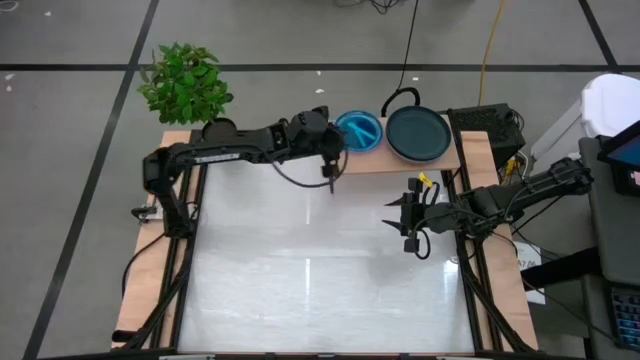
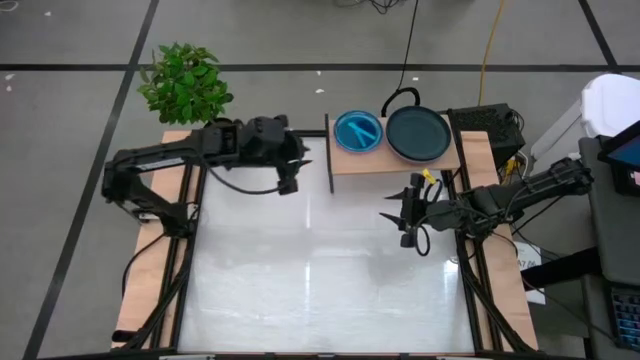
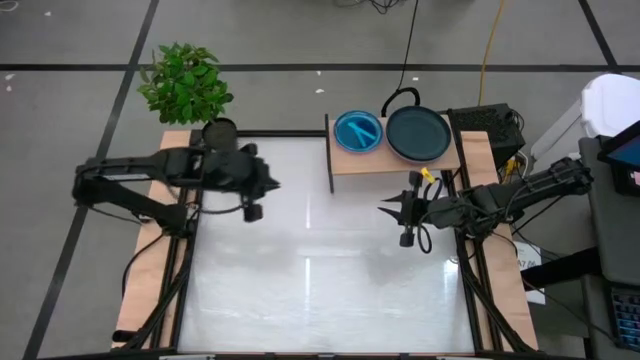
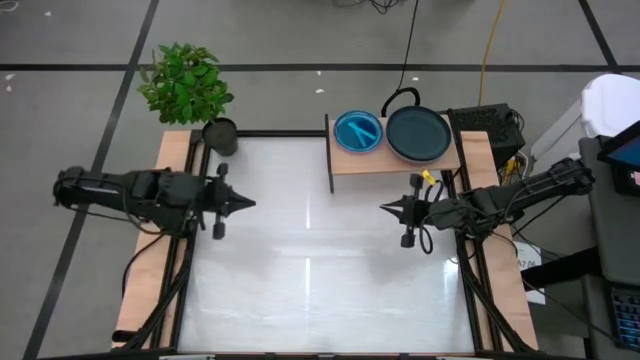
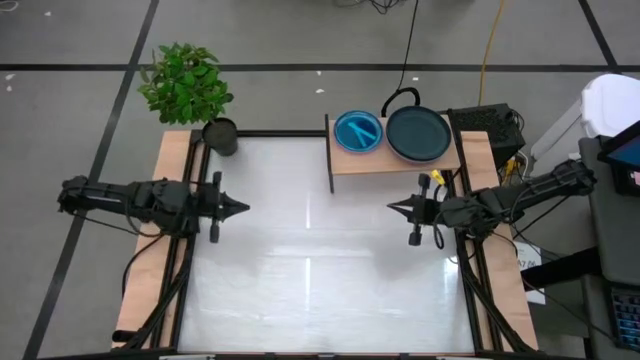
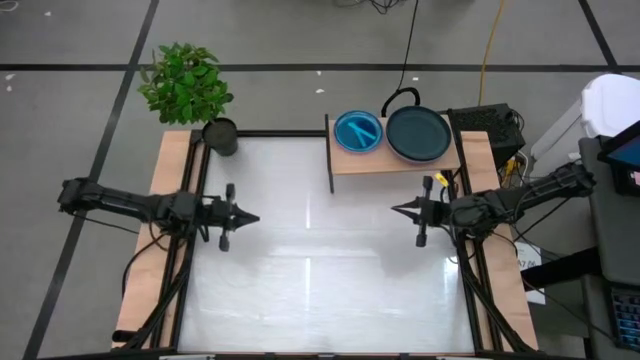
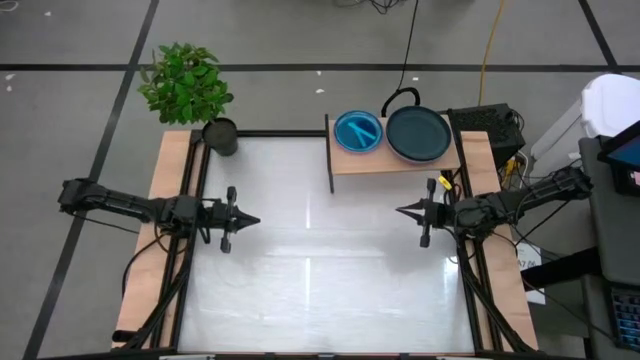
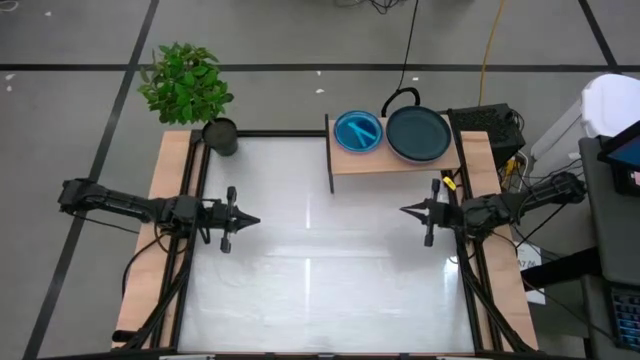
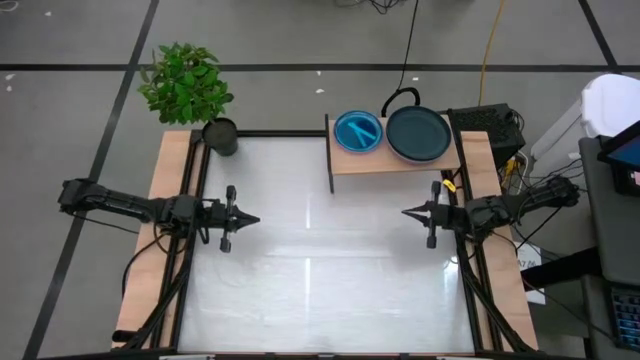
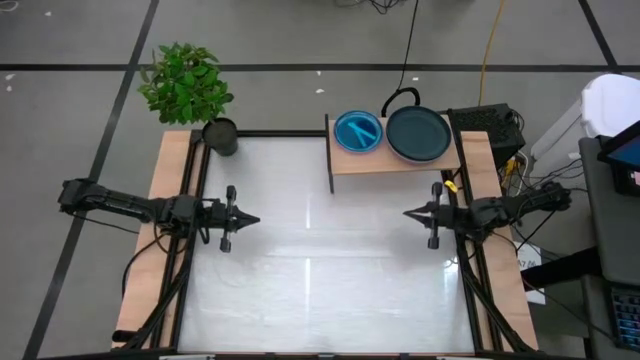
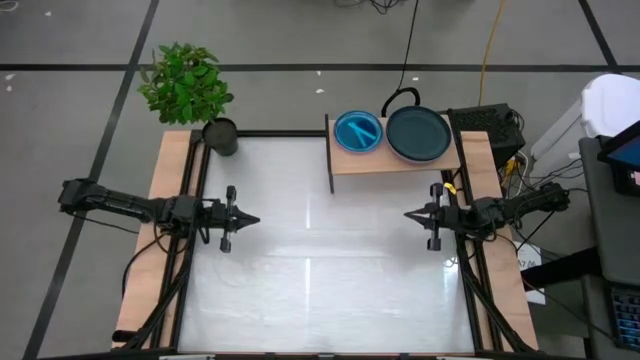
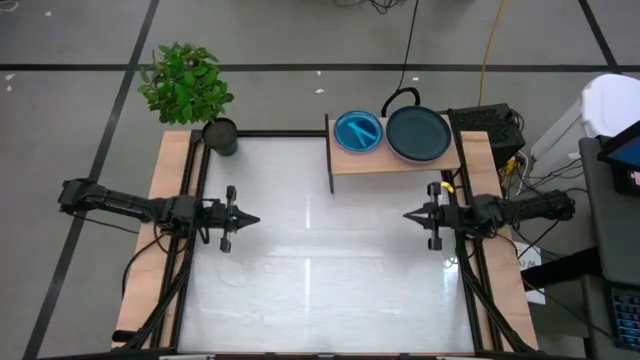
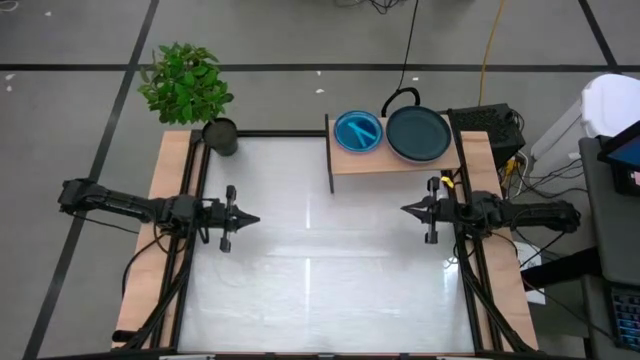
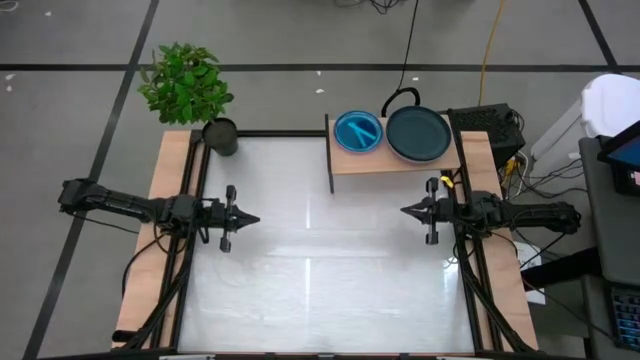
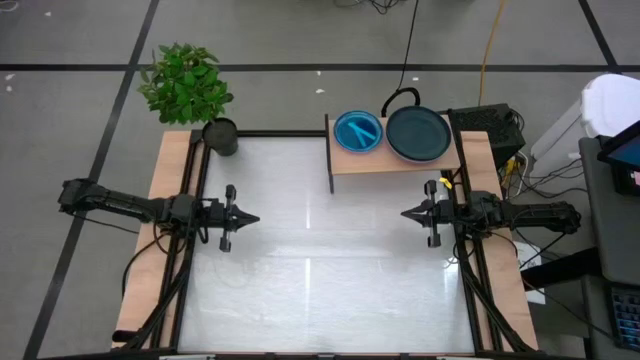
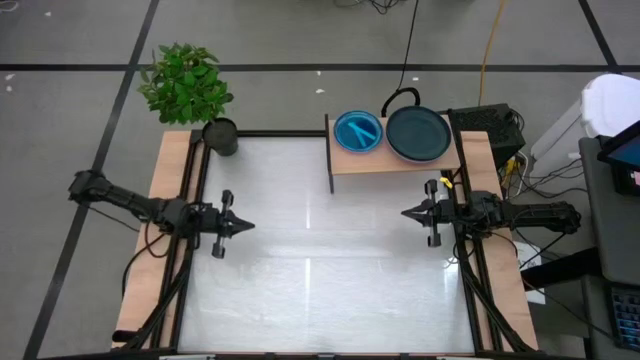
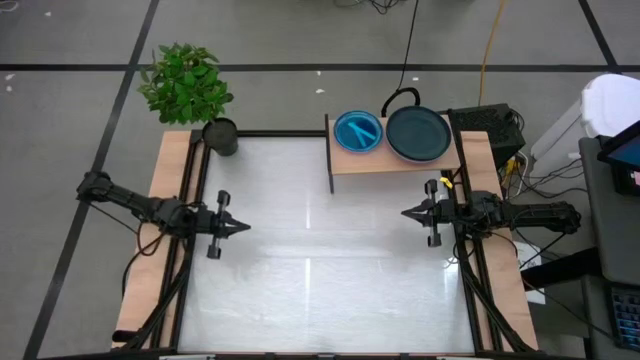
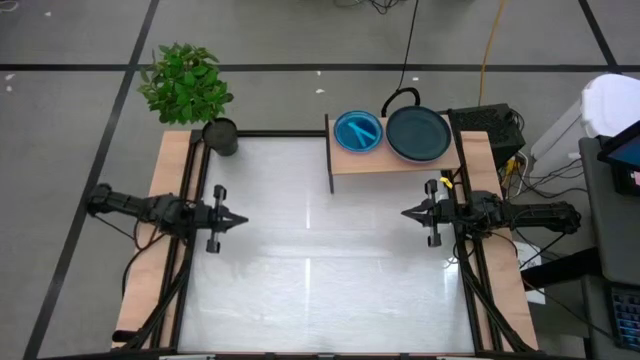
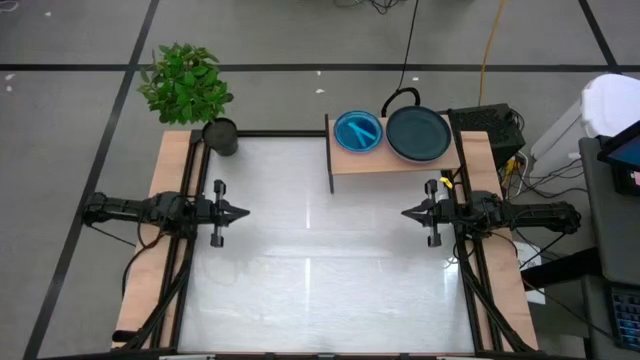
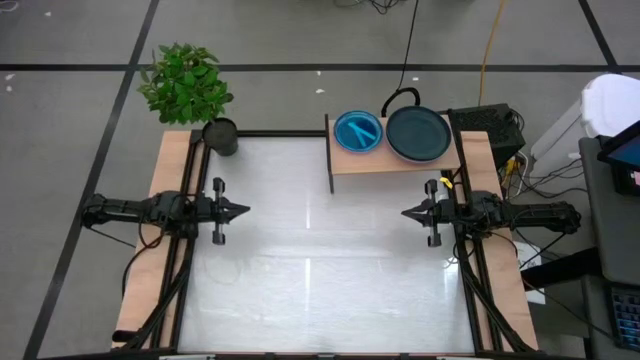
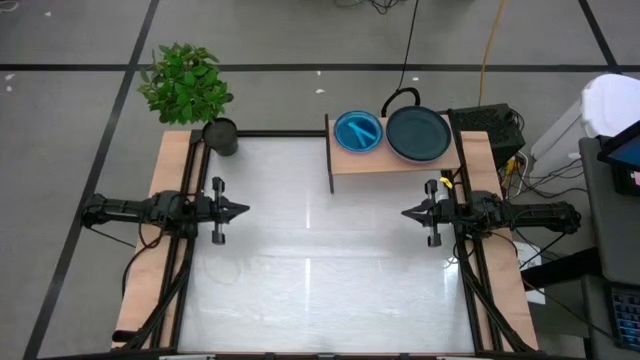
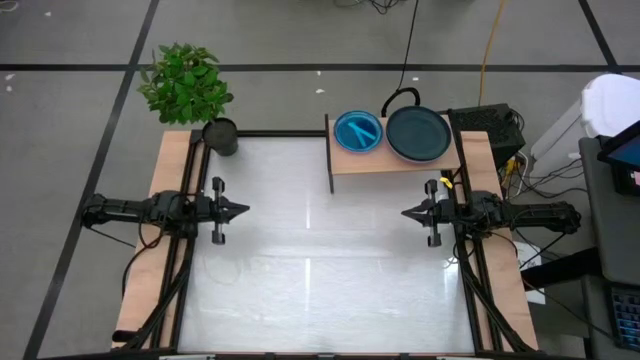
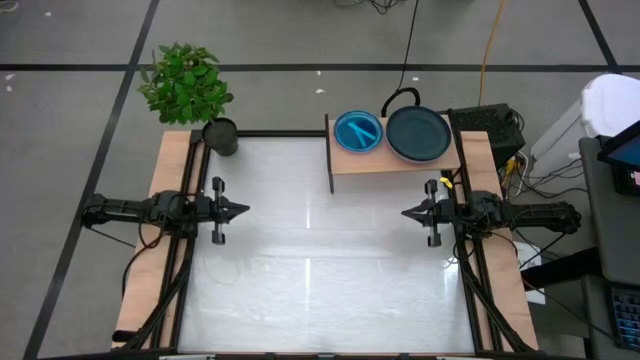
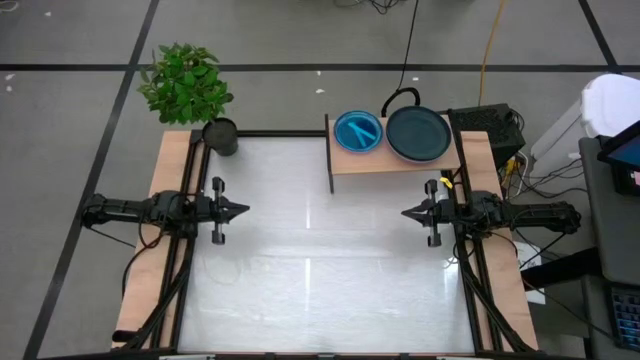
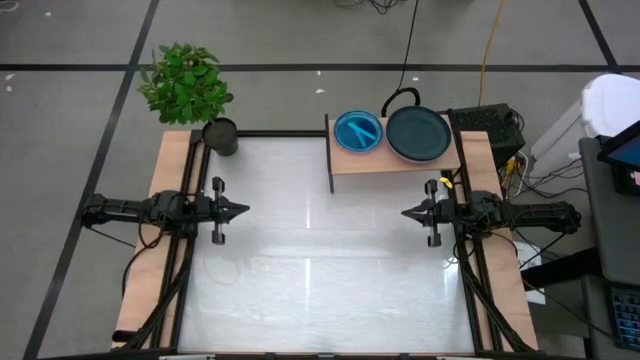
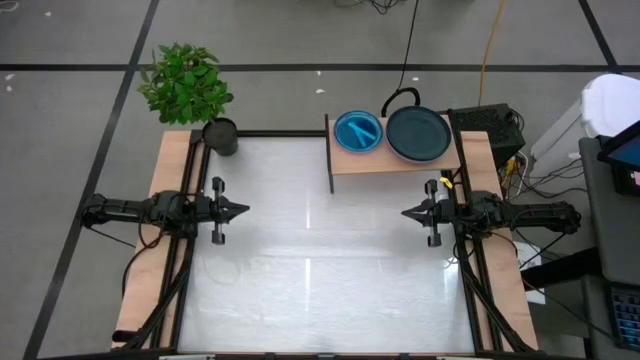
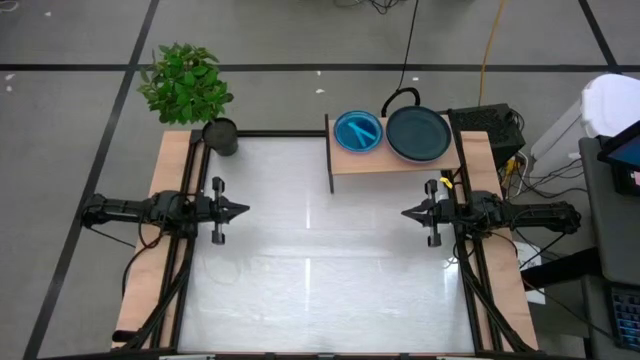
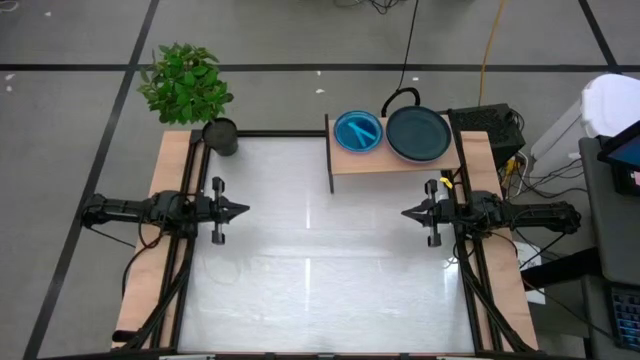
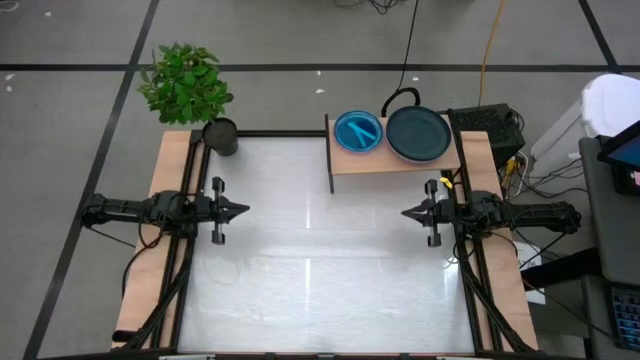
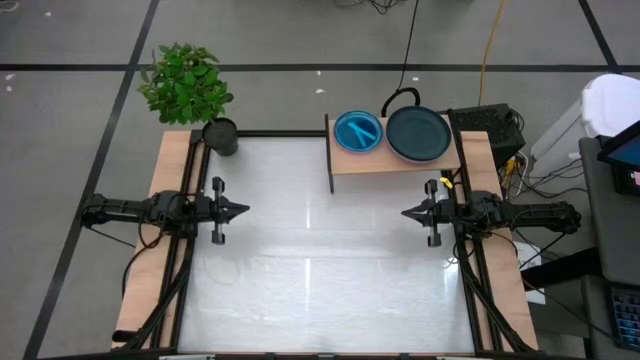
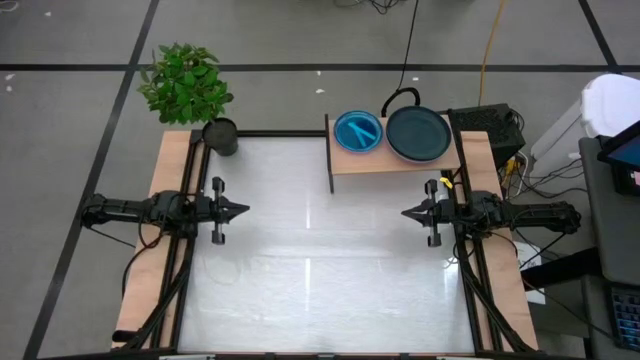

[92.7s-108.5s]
Task: Place and stack plates onto a shelf
Return to Home Position

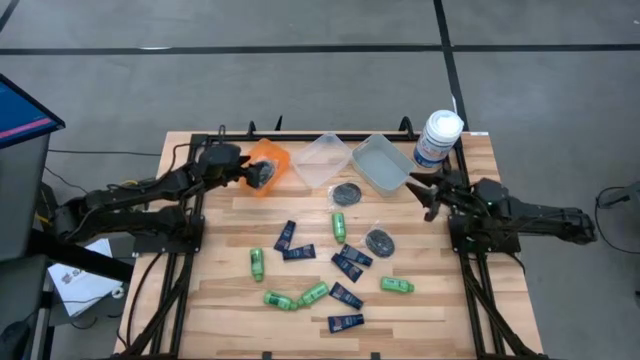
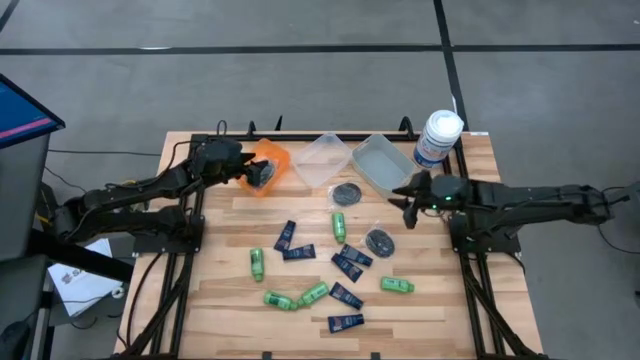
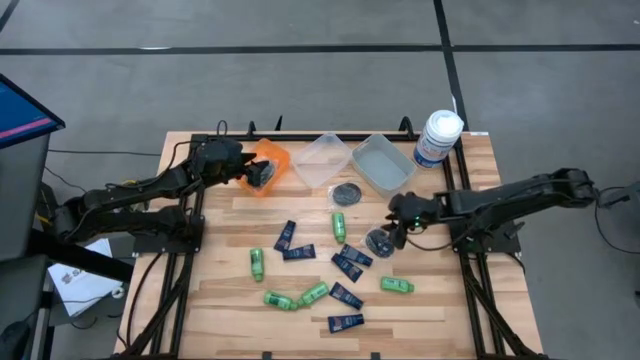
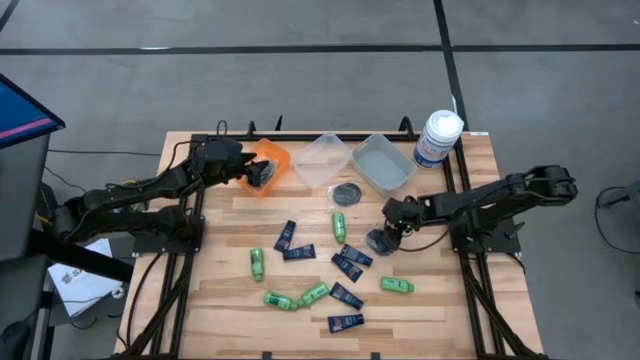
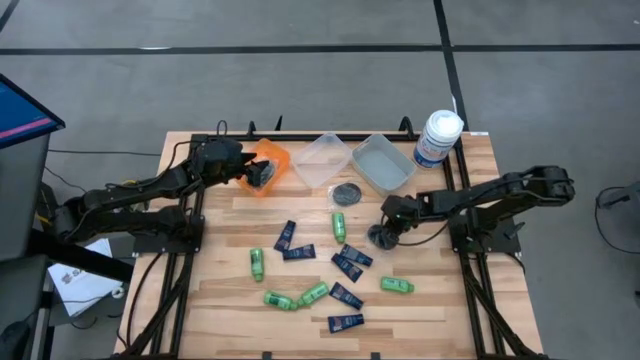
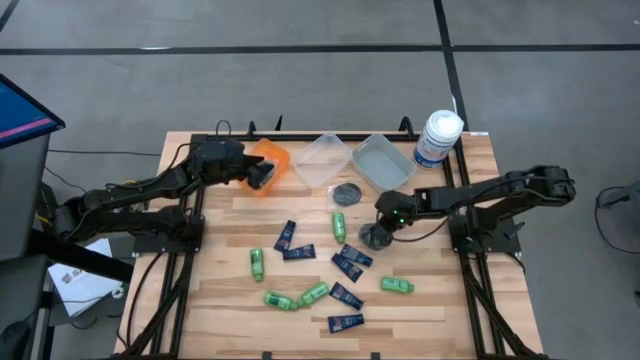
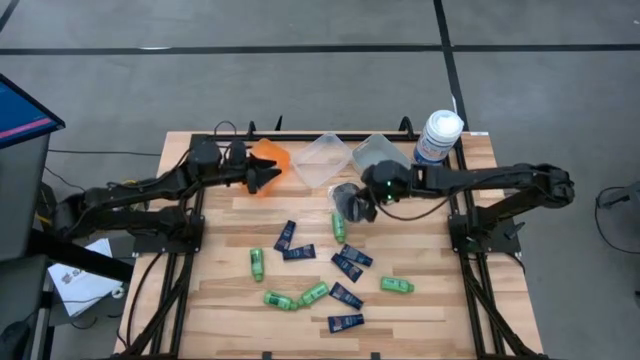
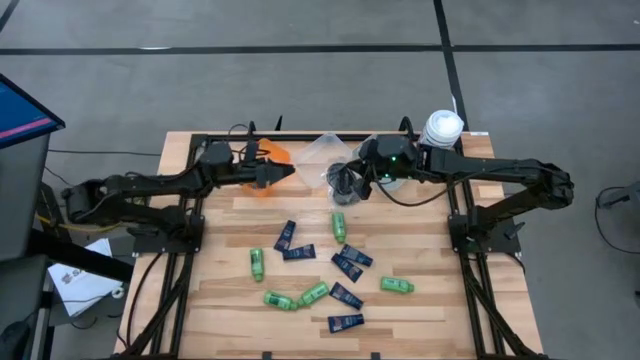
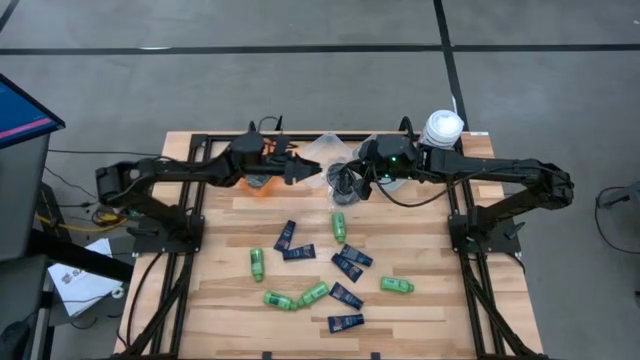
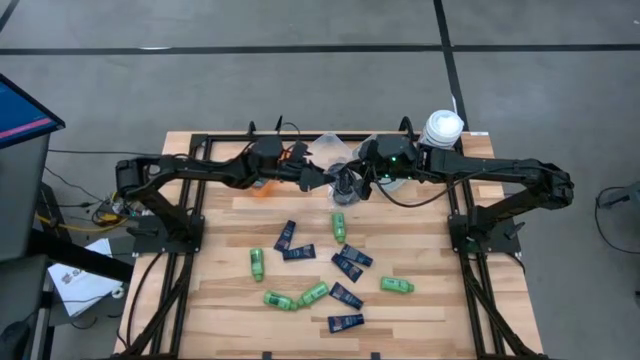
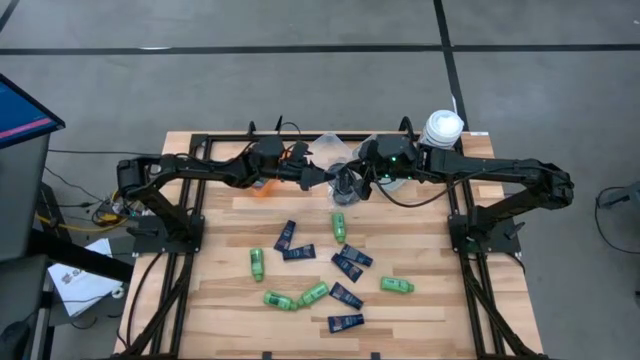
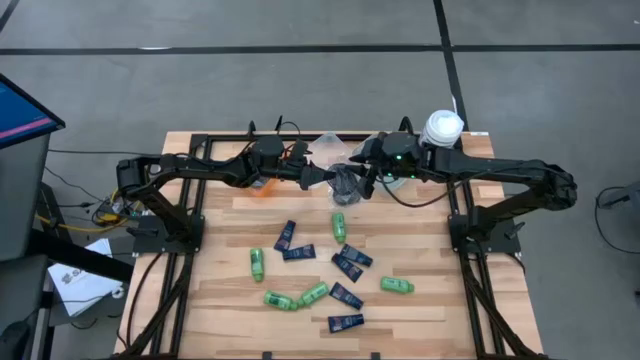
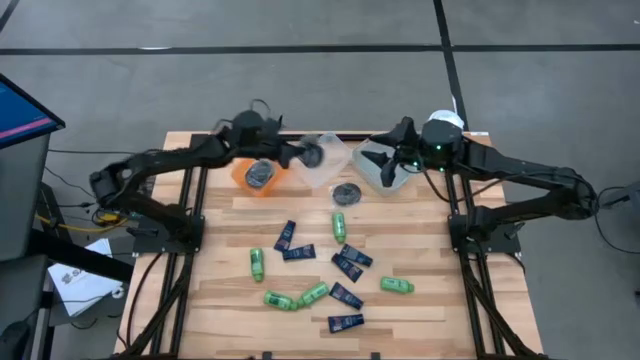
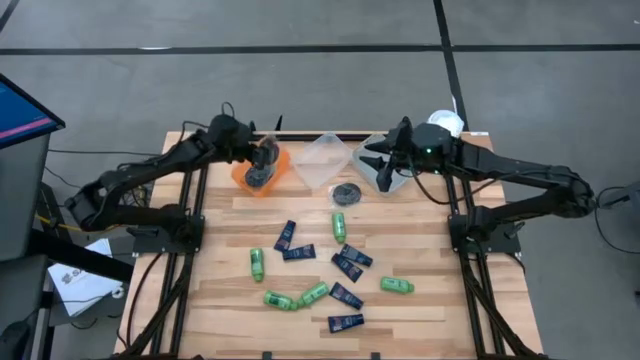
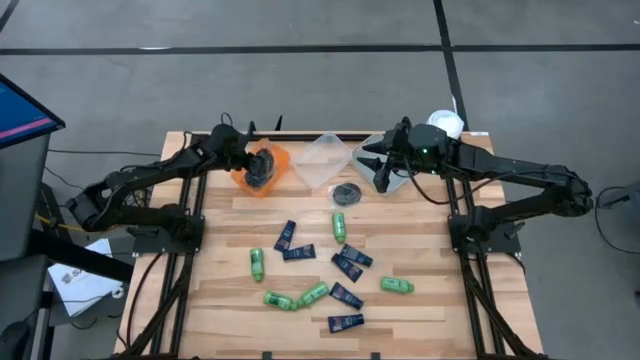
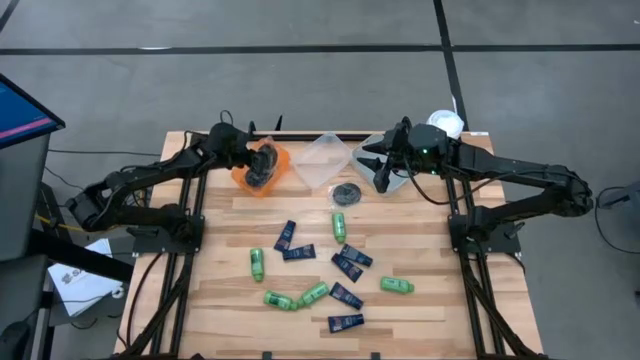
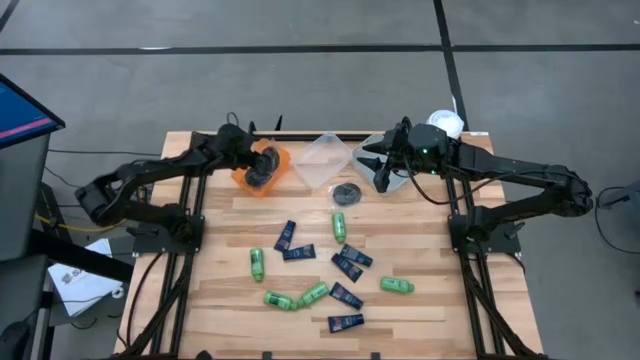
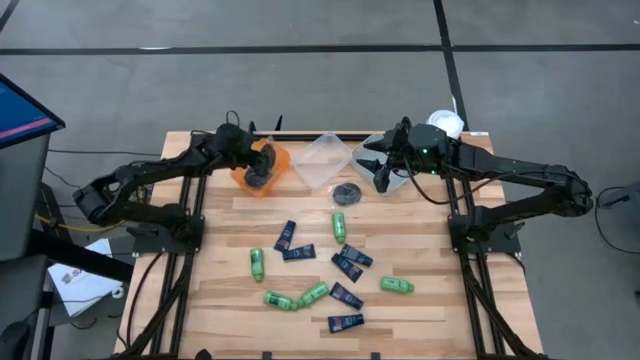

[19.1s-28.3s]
Task: Pick & Place Travel size toiletries
Put the hairbrush into the orange bin
